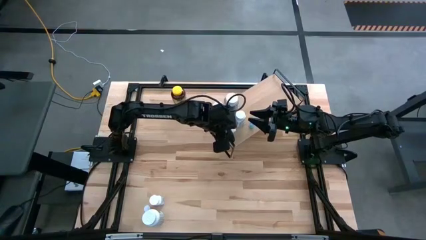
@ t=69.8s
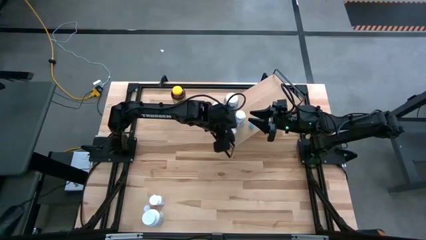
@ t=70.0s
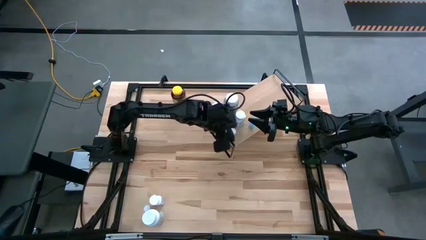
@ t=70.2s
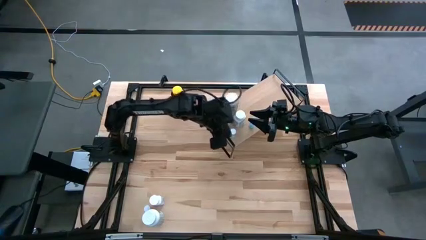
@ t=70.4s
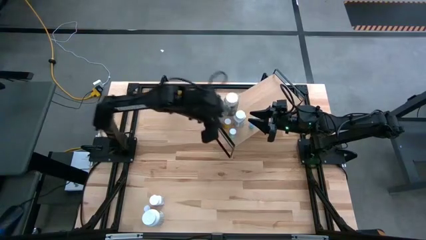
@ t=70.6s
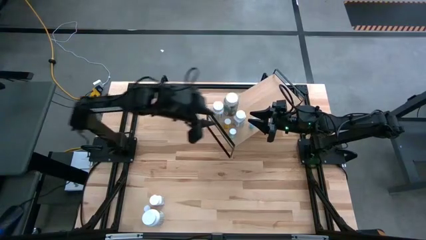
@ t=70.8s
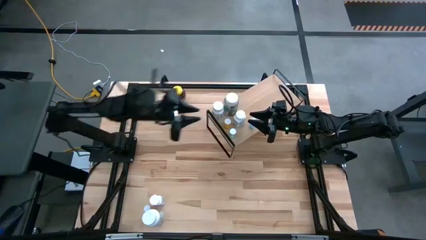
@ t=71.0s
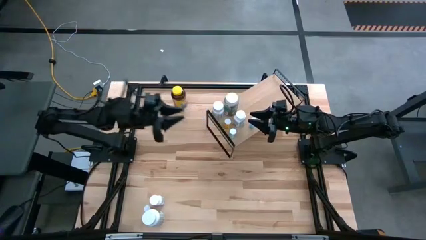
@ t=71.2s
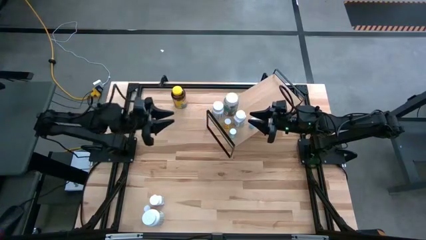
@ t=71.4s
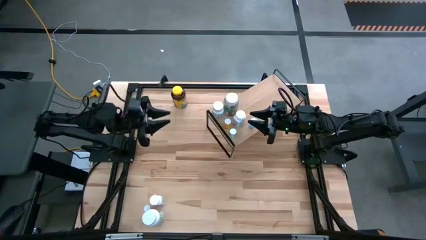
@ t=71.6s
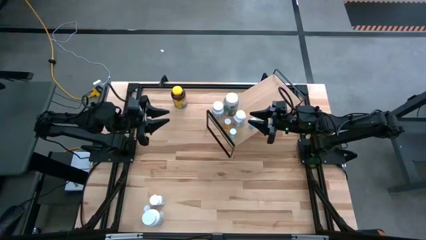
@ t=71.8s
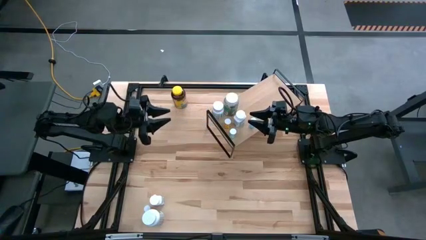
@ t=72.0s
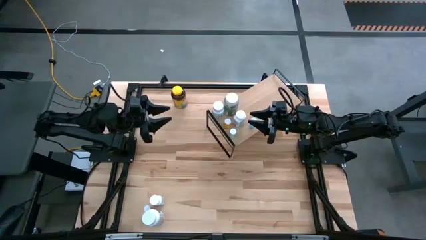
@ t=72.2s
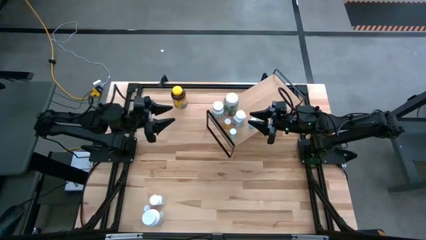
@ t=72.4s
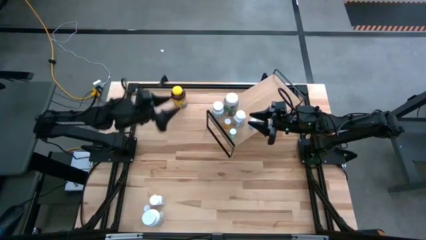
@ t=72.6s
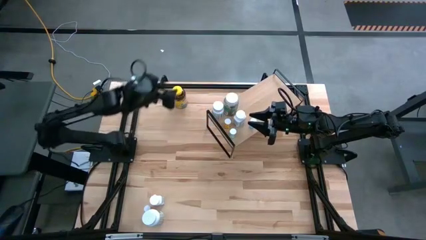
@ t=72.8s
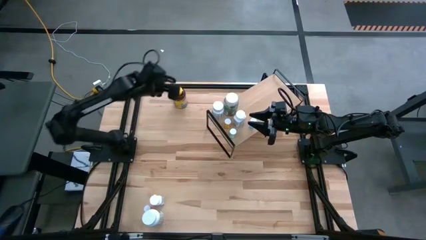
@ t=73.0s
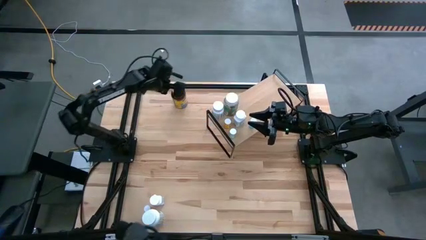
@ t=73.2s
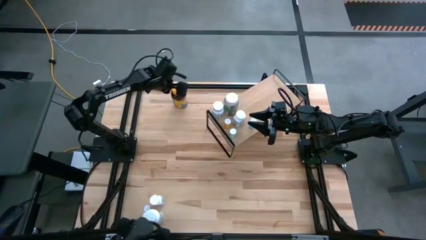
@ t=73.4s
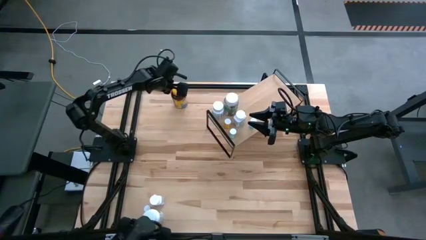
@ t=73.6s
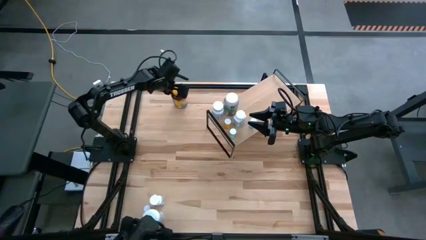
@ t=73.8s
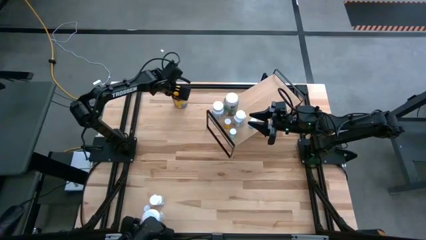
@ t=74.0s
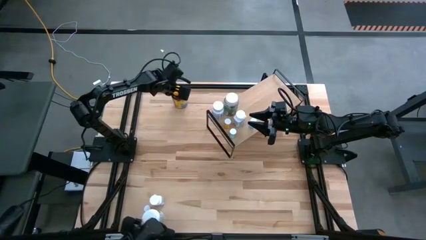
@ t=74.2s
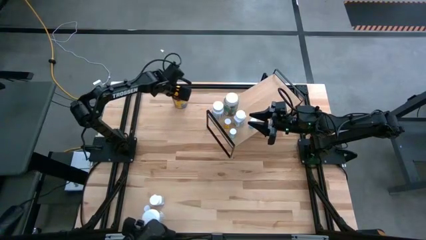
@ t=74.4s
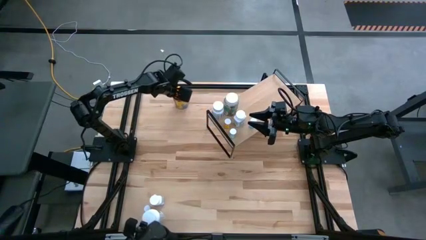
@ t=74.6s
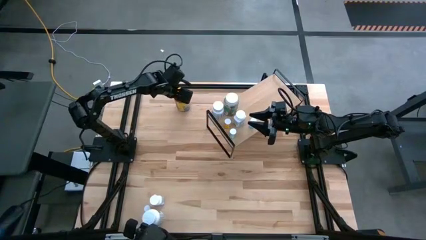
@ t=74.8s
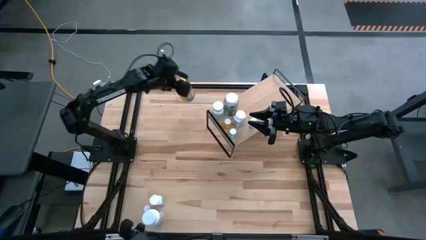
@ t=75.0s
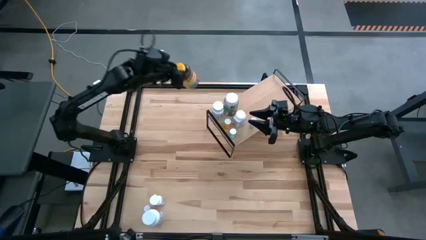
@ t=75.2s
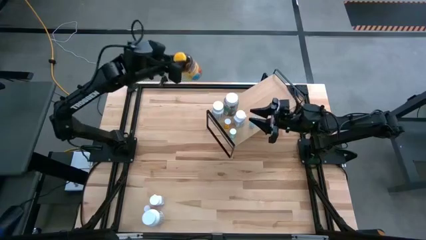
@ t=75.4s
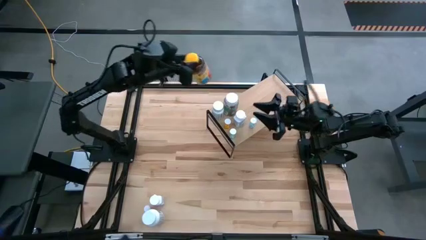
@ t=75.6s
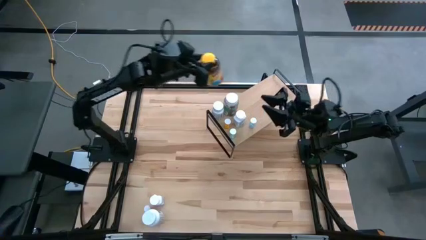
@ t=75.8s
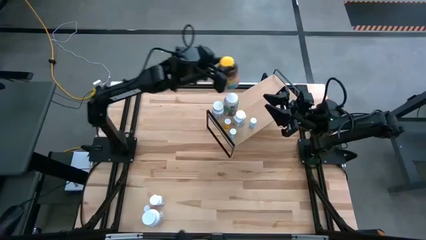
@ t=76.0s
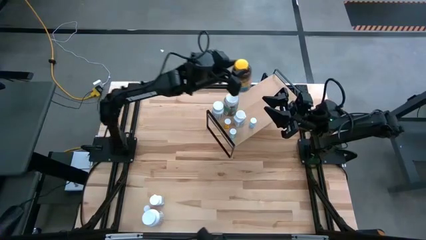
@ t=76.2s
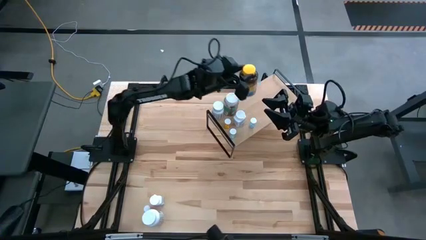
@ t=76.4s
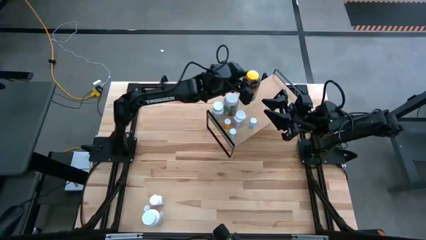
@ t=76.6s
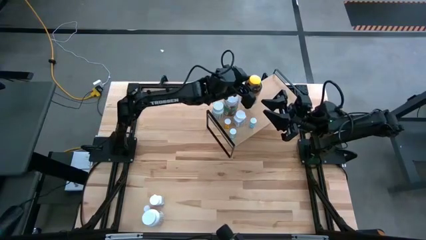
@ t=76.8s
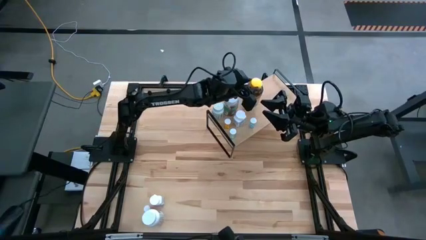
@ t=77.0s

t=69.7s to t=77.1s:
Task: Pick and place medicine bottles onto shelf by color
Put the yellow pill bottle on the shelf

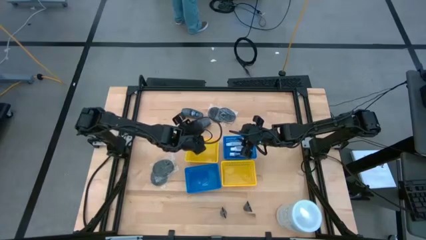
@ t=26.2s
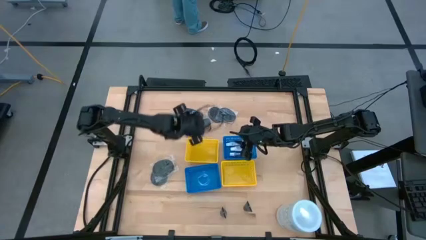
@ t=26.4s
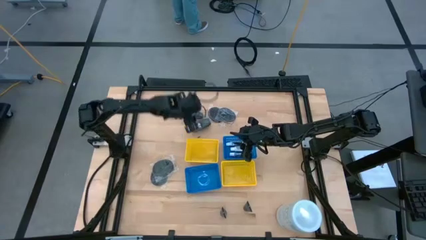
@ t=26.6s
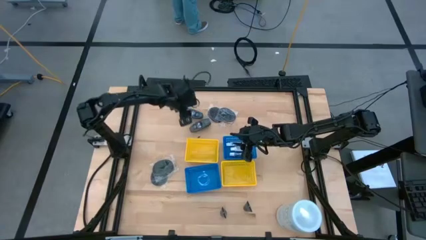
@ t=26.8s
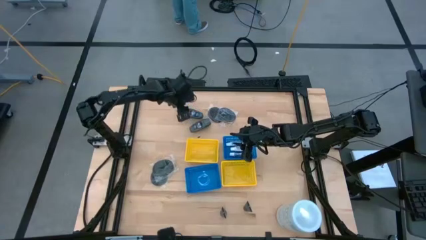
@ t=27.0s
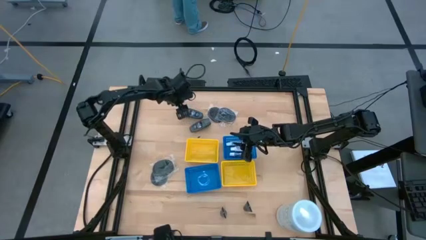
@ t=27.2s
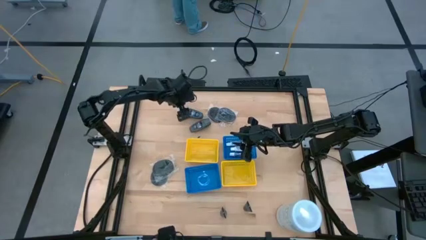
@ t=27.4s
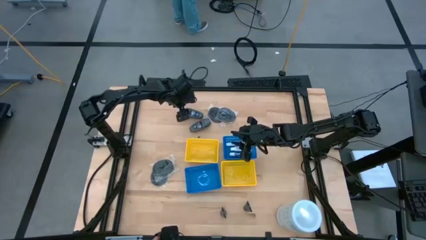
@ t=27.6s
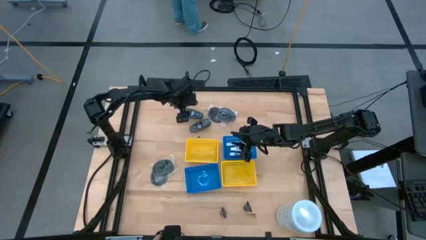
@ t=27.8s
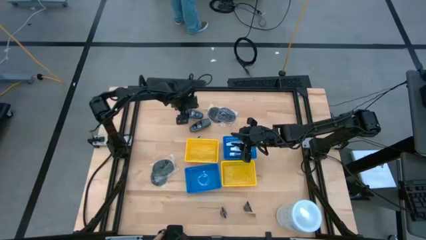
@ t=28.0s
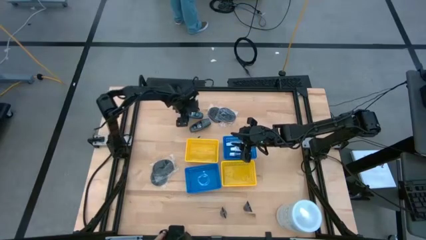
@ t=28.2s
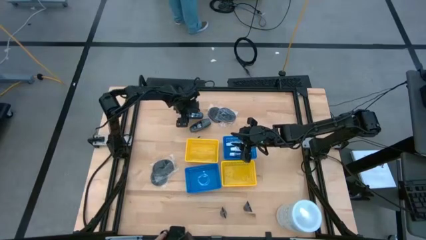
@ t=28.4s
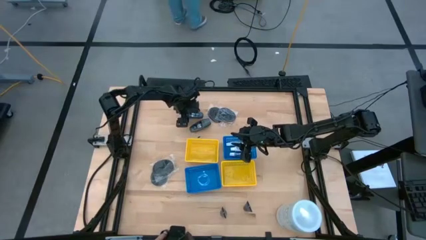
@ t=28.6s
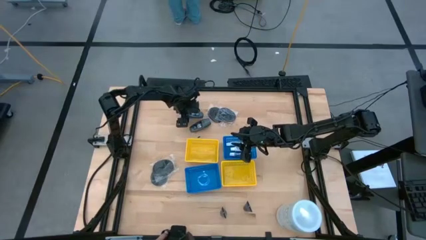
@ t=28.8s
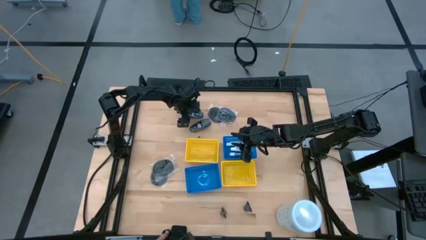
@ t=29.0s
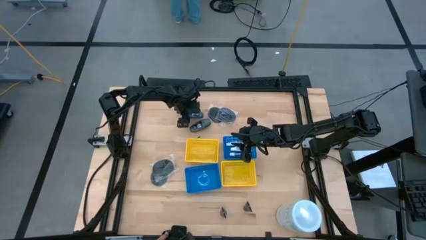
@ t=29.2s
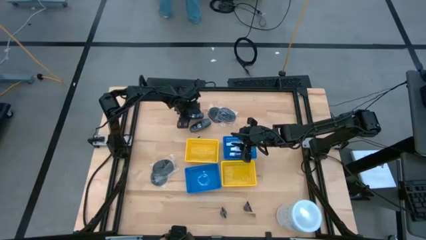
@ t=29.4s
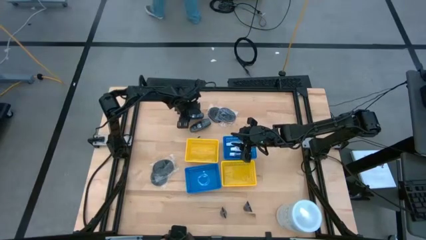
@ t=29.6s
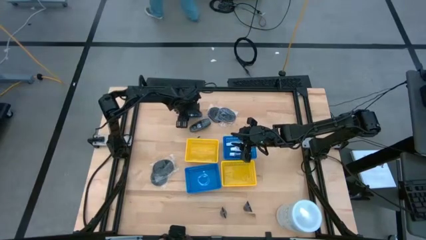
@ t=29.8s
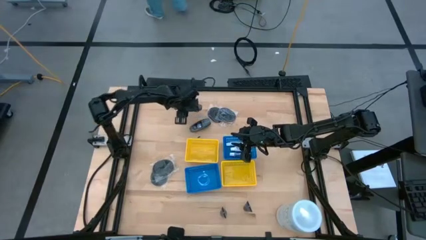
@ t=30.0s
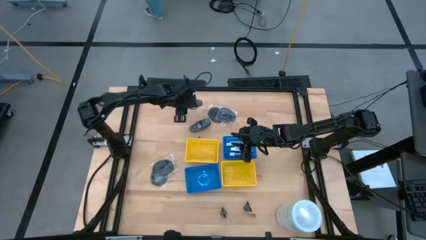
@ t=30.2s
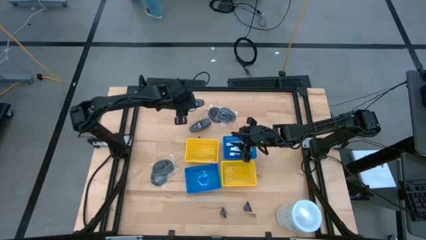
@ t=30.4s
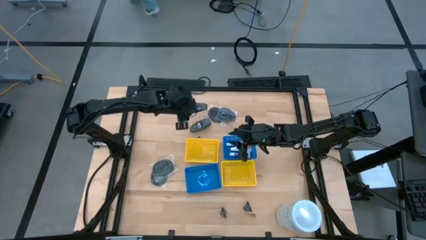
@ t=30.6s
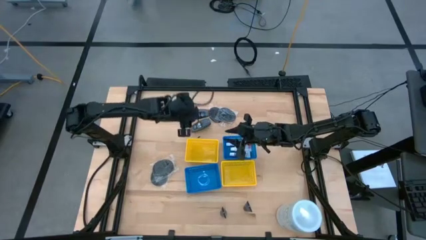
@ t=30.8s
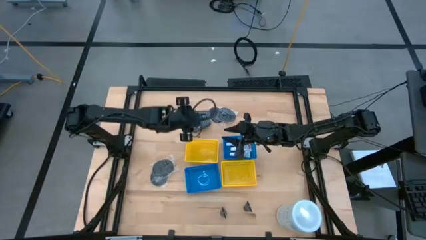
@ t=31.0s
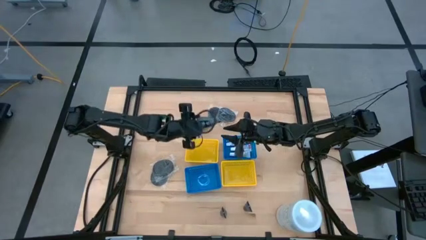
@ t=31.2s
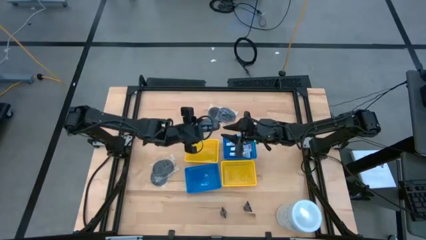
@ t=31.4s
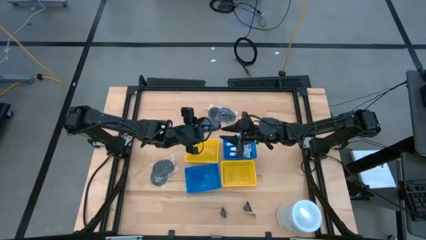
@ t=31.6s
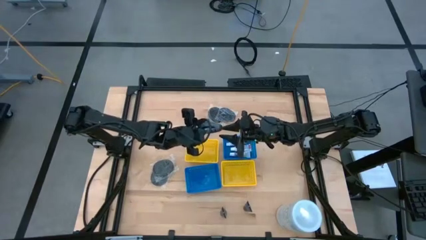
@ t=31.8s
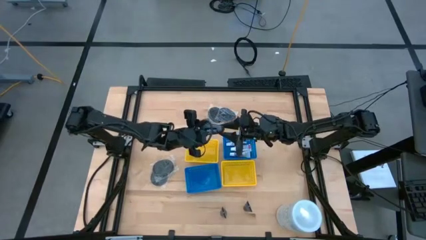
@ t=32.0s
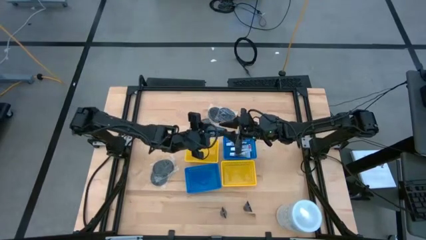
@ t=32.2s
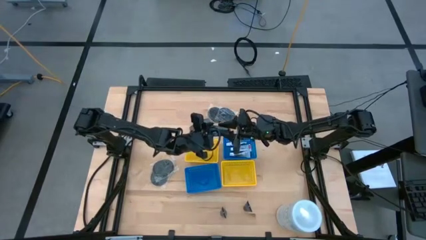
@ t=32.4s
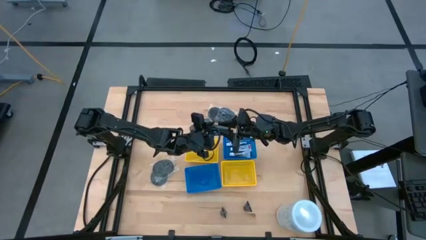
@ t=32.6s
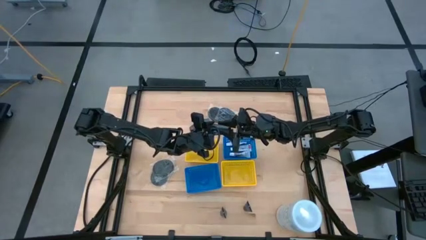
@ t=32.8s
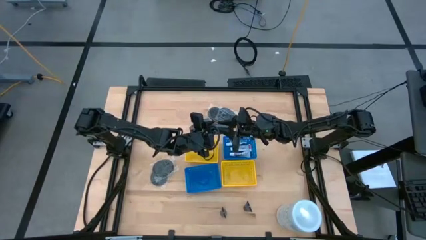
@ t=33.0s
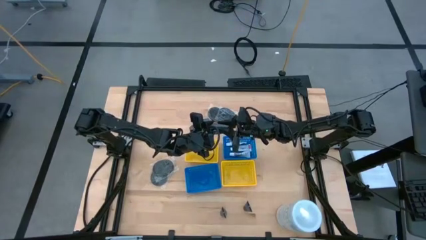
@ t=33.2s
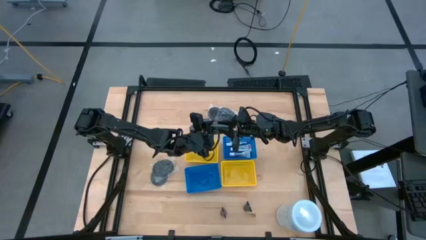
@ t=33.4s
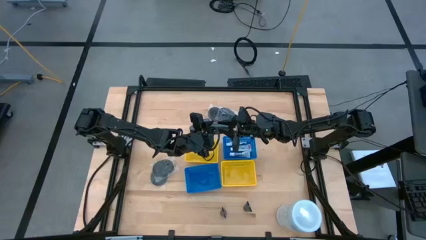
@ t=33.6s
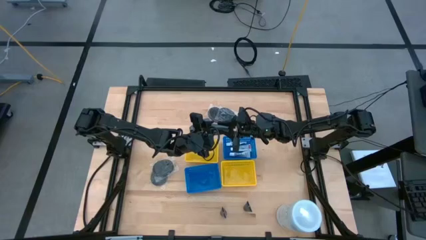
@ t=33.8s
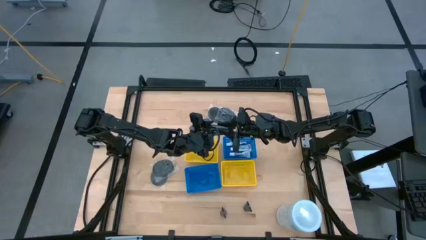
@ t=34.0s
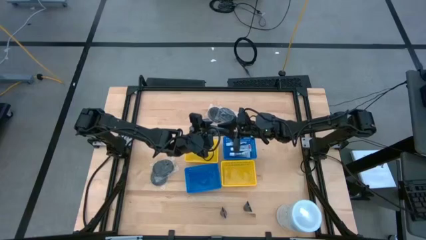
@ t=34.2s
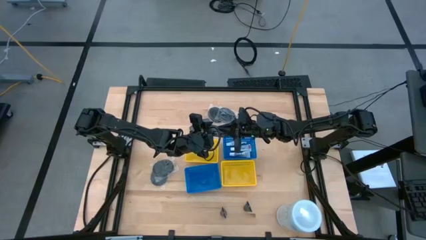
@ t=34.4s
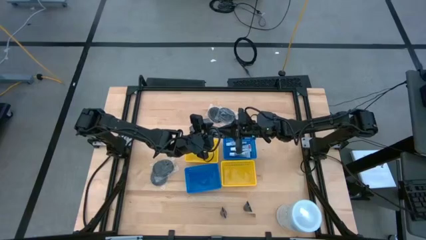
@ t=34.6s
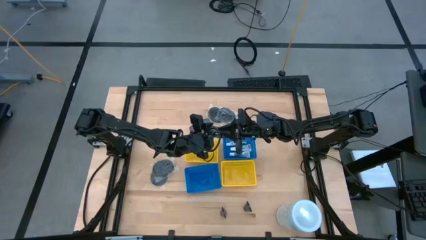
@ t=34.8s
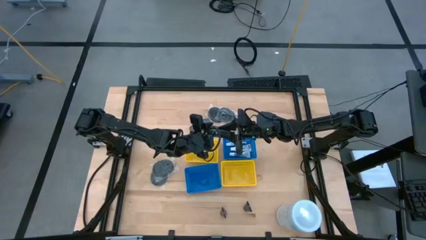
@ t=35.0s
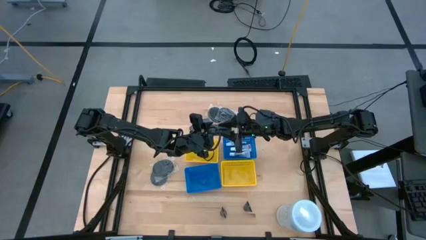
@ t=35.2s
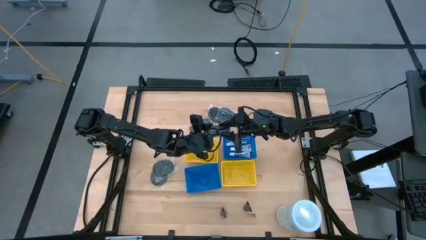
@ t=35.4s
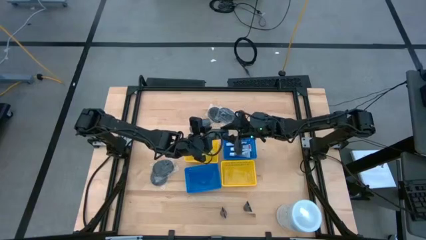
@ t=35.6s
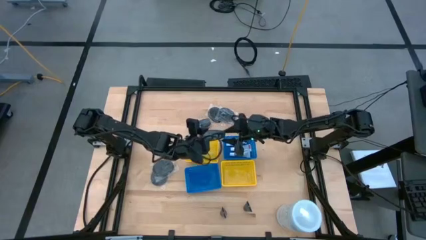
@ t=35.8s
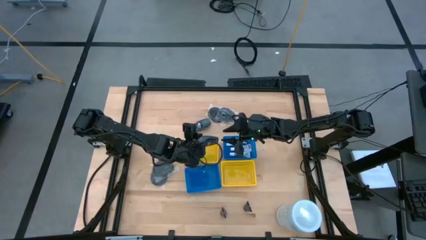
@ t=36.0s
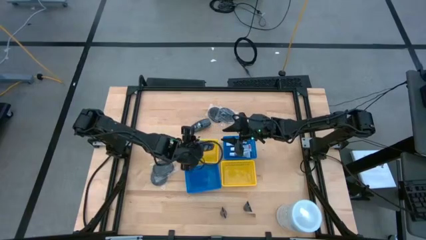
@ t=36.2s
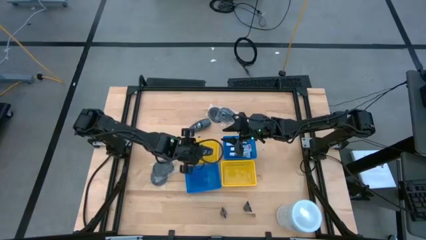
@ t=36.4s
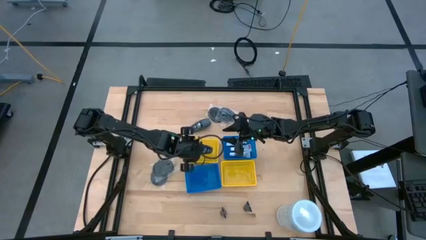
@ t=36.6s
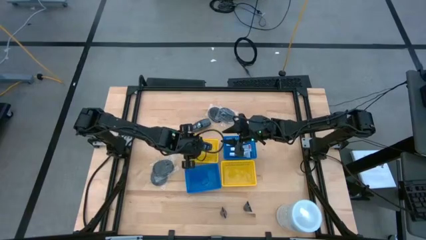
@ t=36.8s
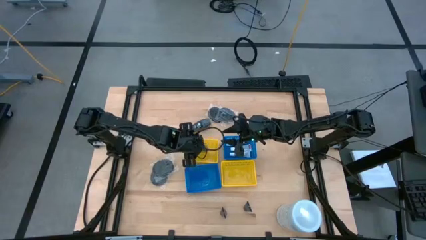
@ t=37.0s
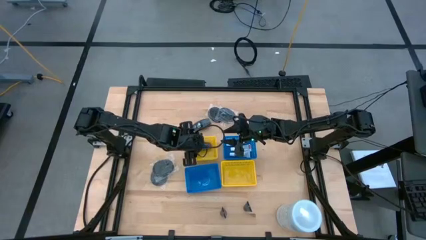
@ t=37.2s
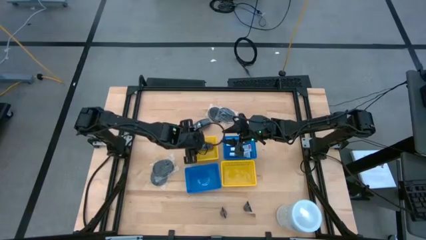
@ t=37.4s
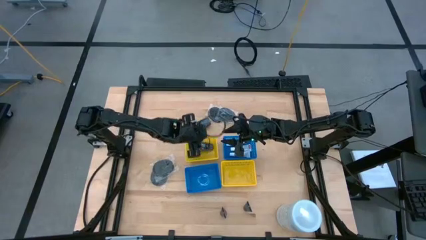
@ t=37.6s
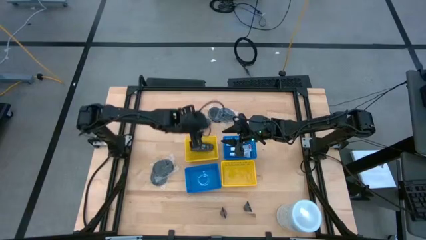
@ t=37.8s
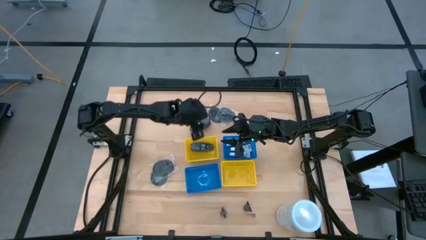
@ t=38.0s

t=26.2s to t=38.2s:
Task: Pick & Place Travel size toiletries
Put the top deodorant into the top left yellow bin
